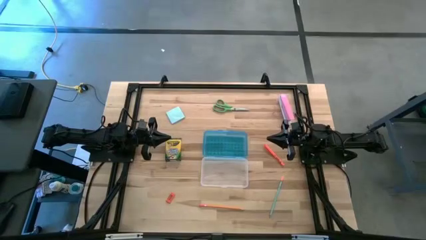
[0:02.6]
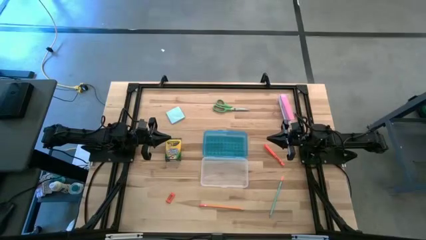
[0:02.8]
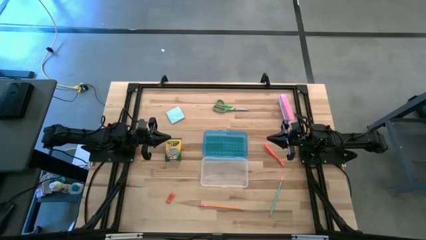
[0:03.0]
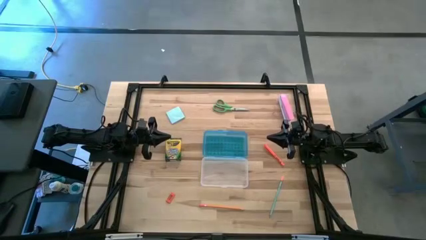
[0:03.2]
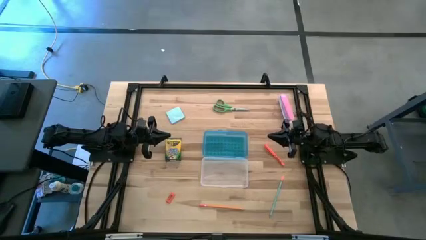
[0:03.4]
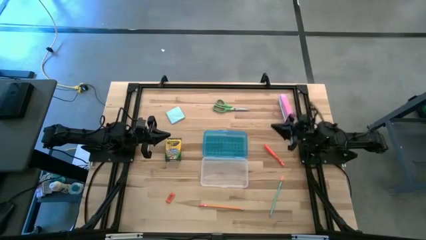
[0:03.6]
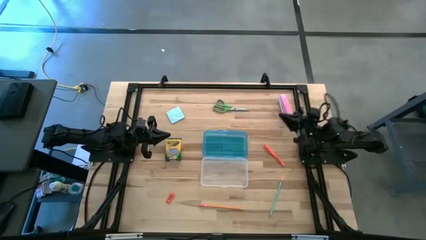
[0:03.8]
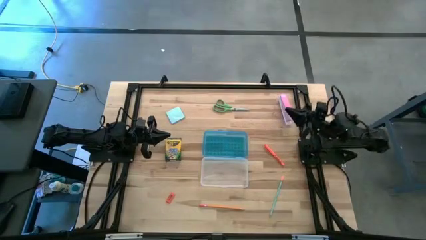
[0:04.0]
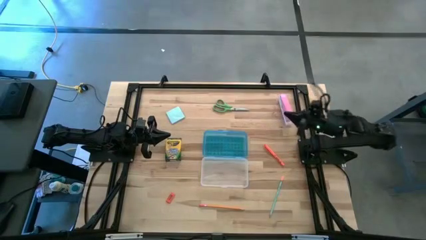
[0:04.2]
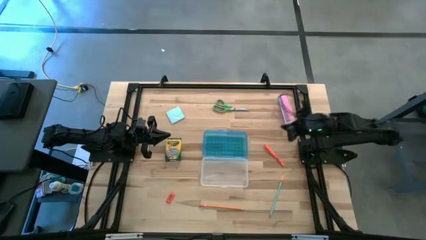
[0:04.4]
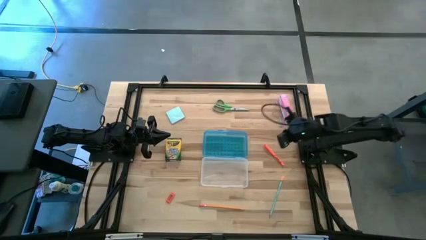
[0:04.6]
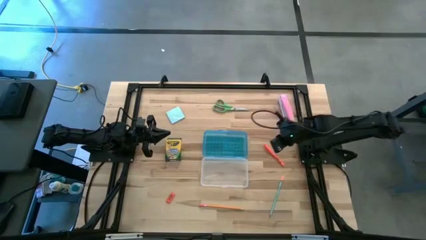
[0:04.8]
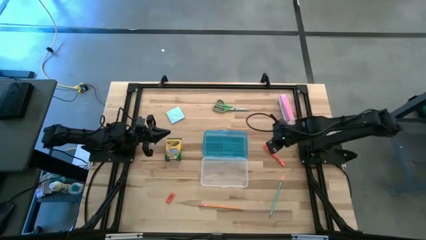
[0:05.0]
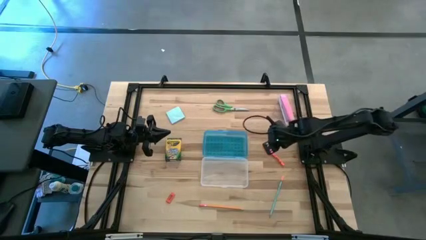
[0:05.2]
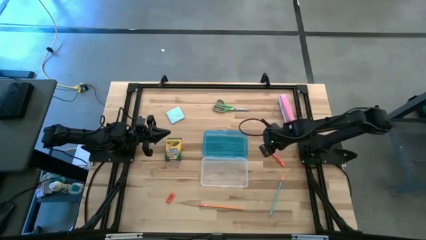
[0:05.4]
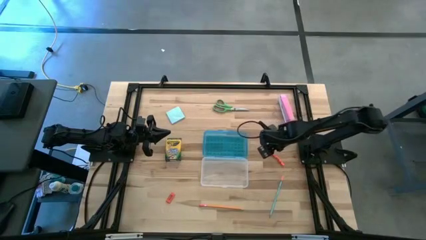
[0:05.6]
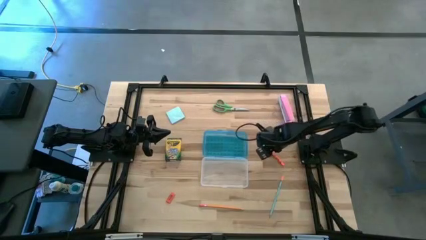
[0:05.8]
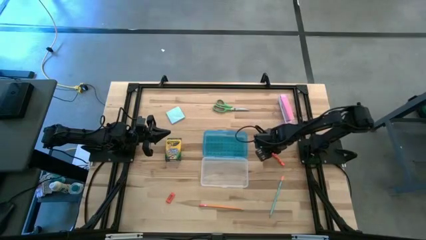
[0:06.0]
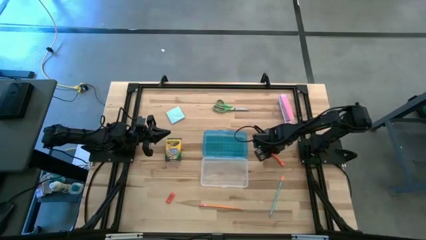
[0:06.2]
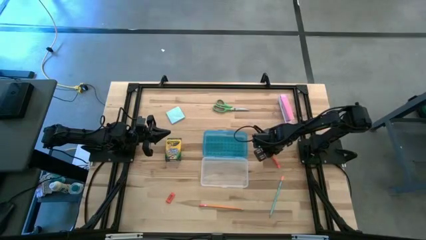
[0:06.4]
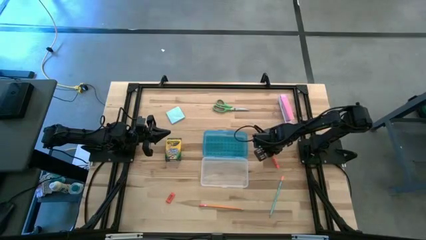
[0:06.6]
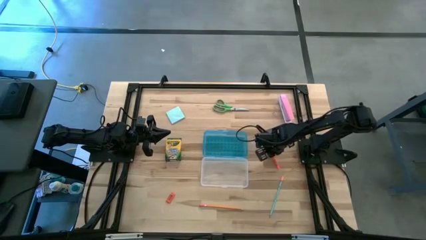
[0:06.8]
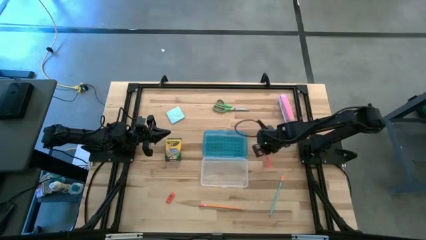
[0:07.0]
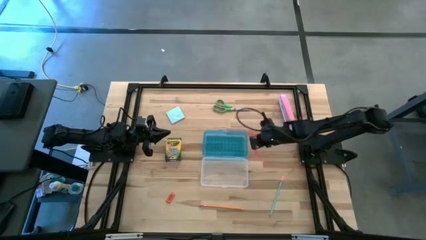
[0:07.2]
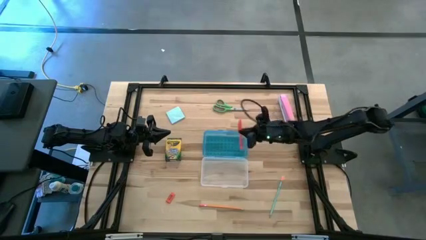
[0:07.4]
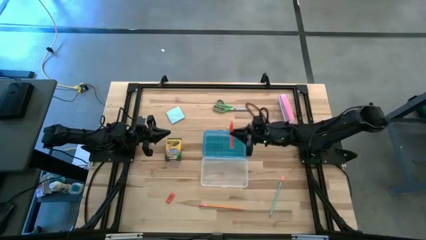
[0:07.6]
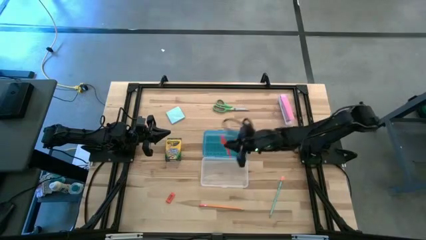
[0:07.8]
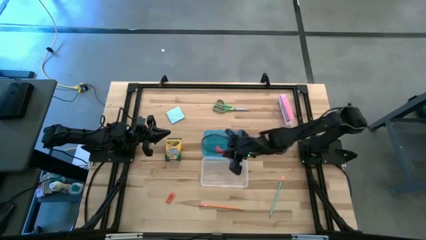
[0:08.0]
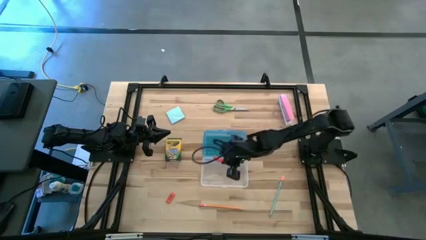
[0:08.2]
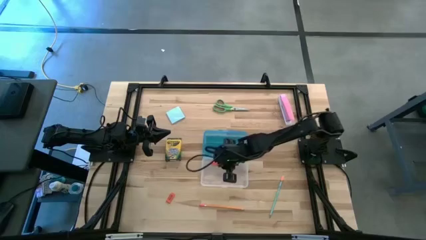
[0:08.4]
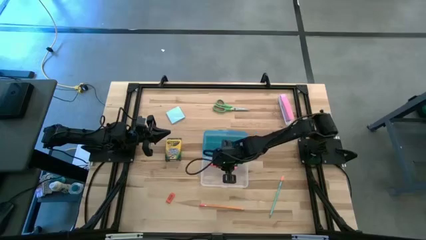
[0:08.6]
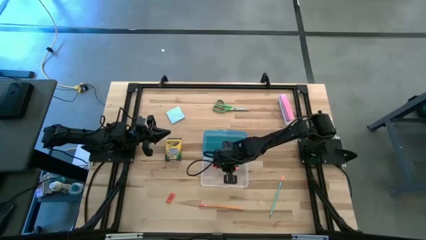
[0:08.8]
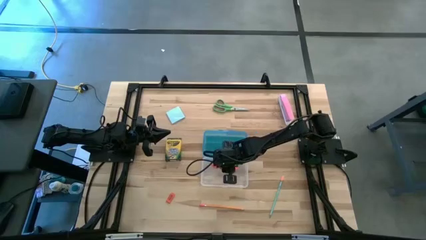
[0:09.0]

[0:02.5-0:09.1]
Task: Pack school essentials
Put the orange pen into the blue supply box

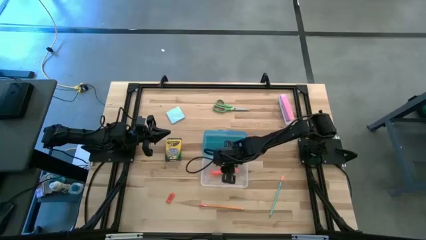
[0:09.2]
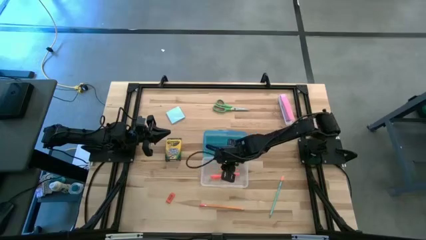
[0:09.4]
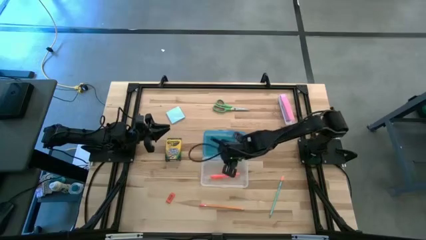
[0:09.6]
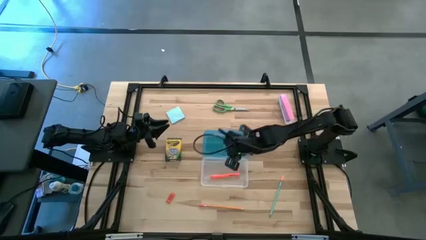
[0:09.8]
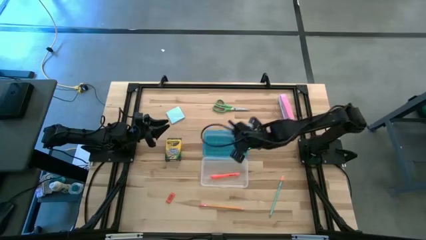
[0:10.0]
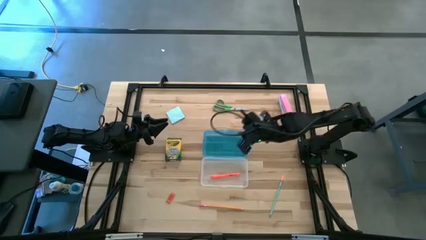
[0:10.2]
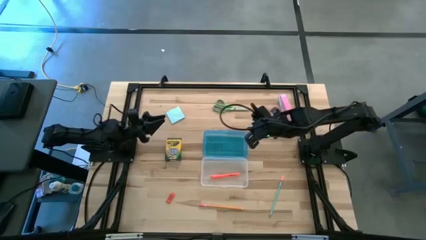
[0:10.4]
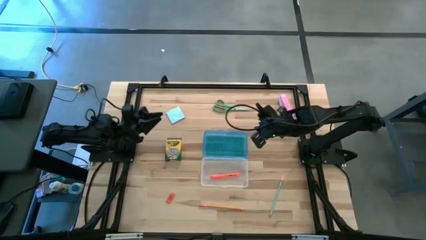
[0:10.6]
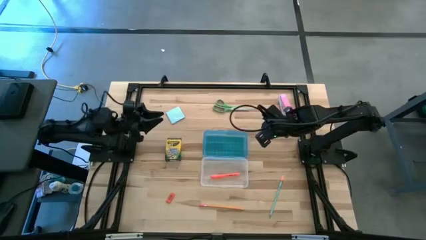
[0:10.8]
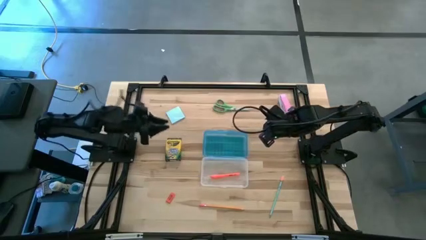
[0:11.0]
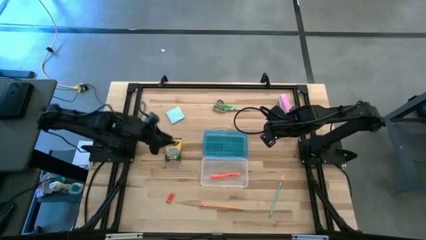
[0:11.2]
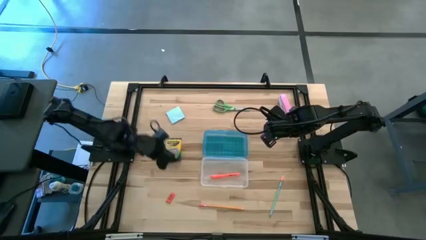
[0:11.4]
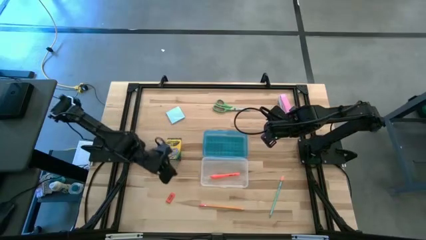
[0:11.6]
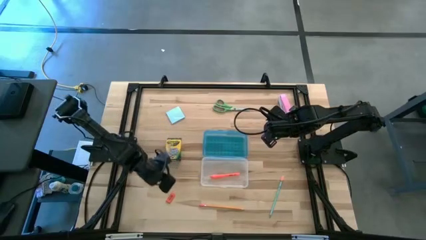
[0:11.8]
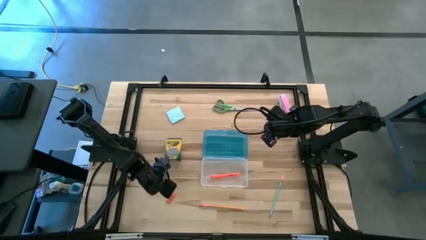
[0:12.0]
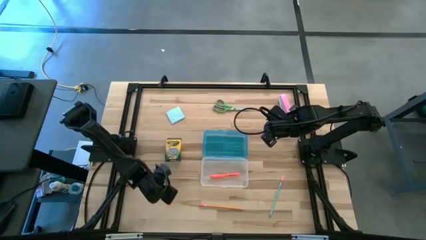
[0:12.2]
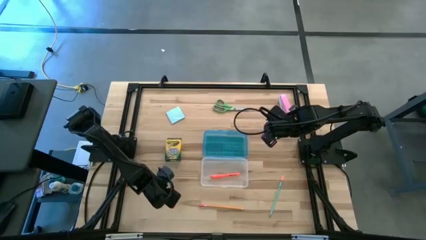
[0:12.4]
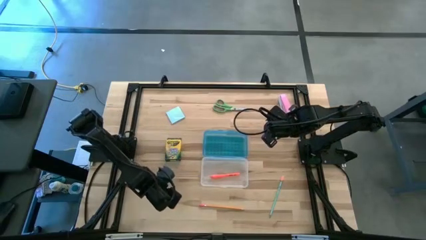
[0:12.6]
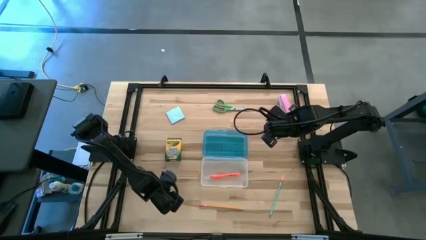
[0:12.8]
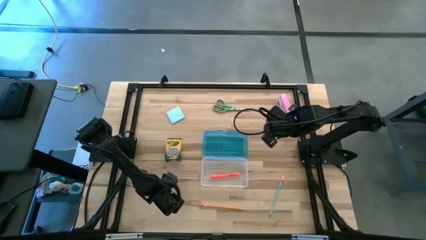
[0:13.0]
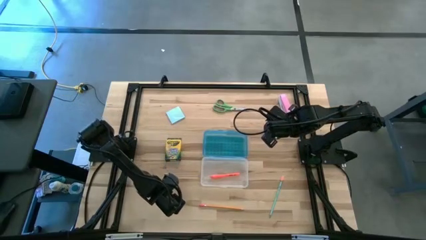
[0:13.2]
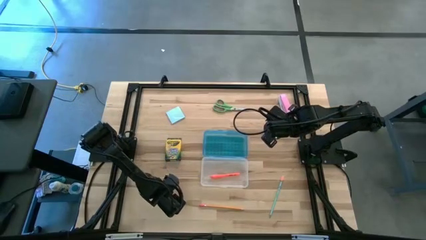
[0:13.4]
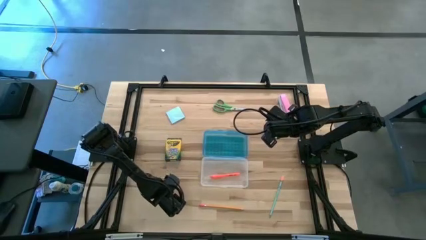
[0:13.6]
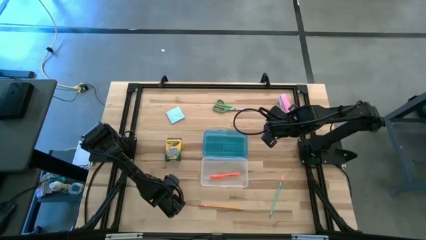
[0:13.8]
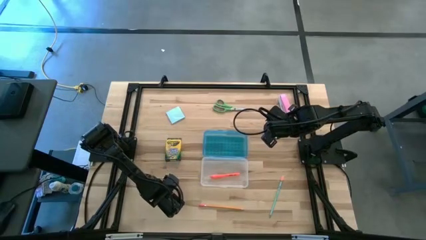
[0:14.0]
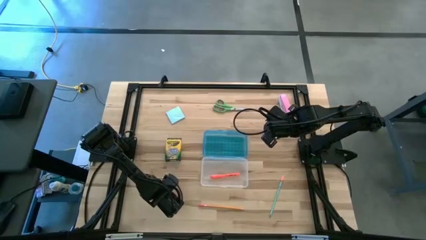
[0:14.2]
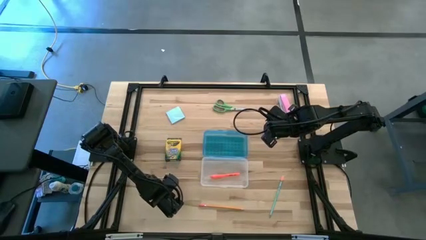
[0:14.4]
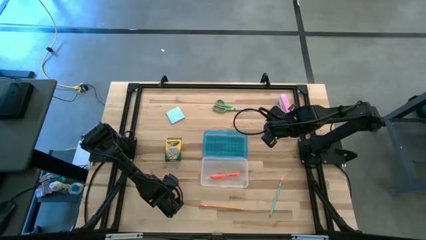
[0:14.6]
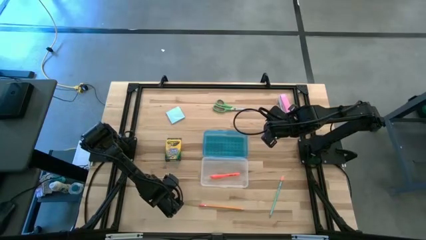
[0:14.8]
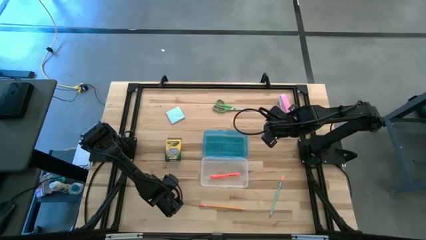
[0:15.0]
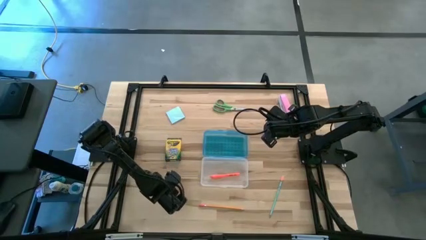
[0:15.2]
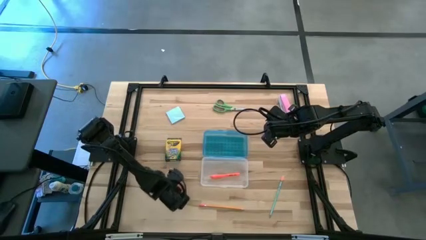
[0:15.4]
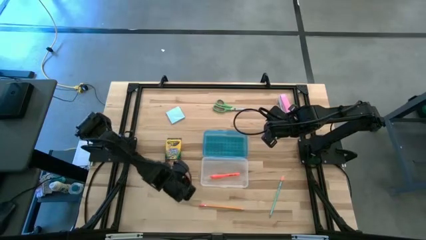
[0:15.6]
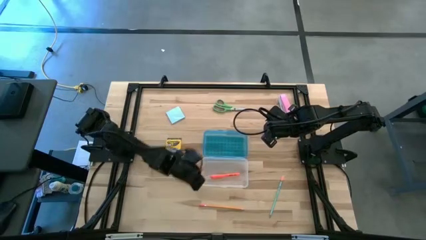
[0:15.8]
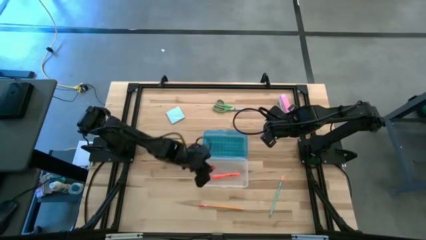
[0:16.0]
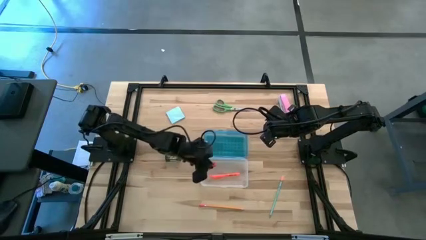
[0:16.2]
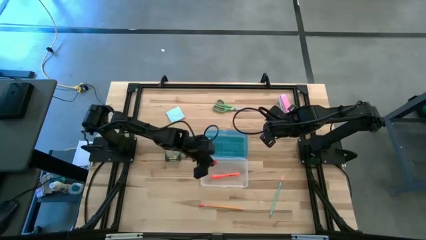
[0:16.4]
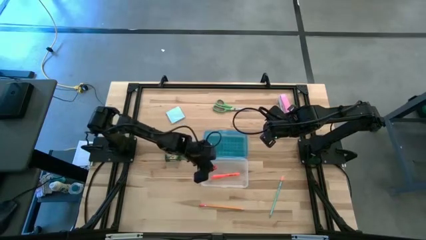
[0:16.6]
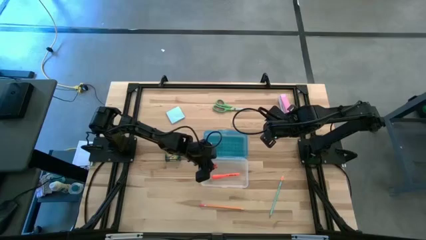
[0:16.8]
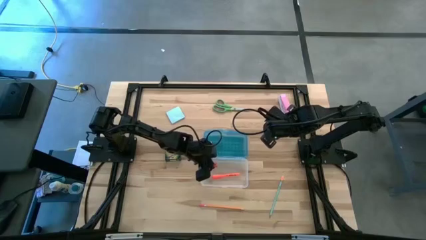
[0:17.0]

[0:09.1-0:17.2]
Put the orange eraser into the blue supply box

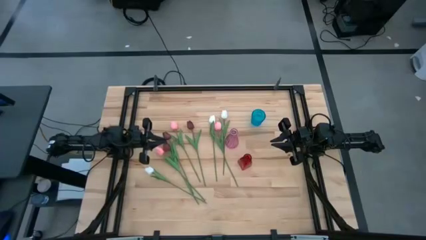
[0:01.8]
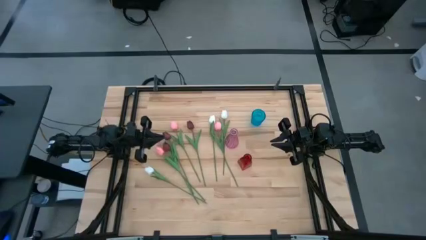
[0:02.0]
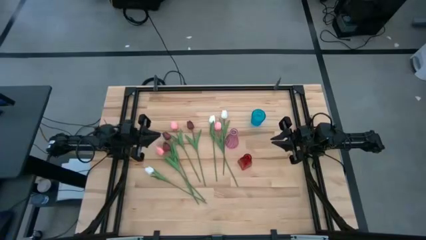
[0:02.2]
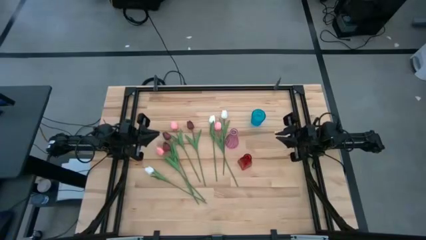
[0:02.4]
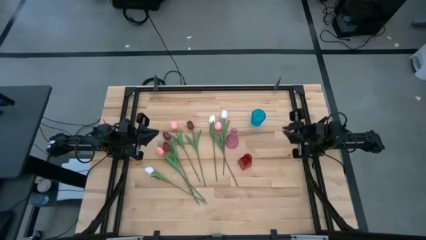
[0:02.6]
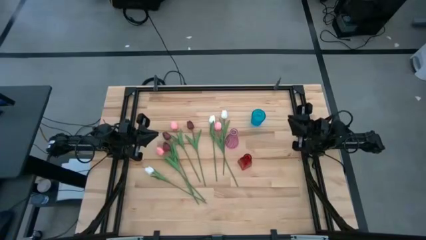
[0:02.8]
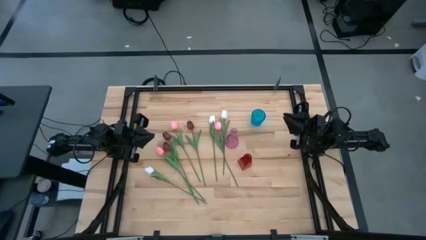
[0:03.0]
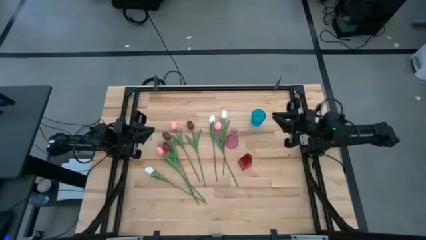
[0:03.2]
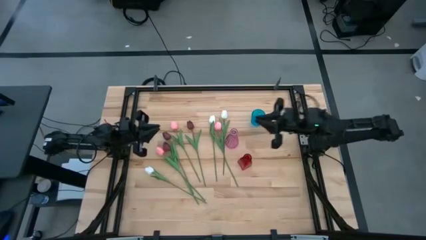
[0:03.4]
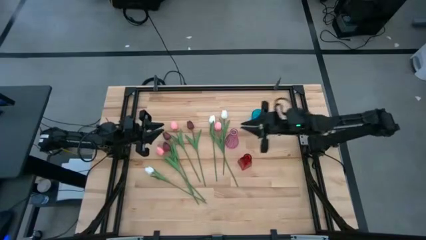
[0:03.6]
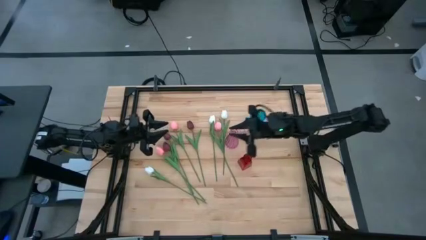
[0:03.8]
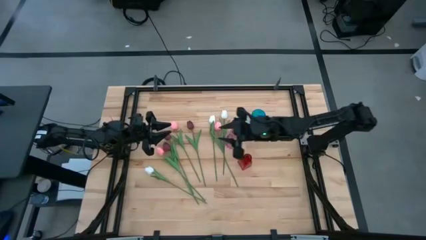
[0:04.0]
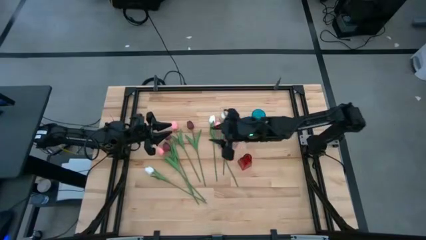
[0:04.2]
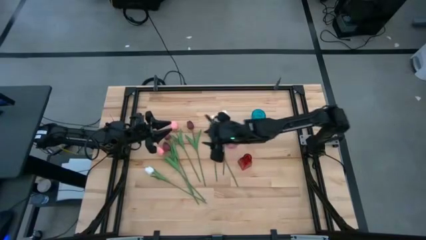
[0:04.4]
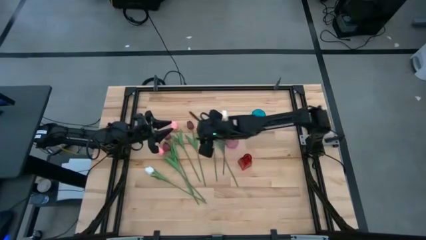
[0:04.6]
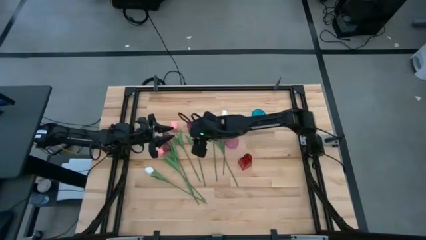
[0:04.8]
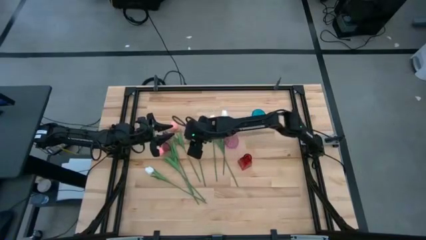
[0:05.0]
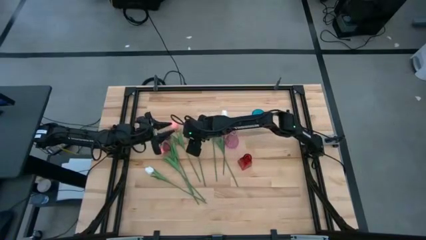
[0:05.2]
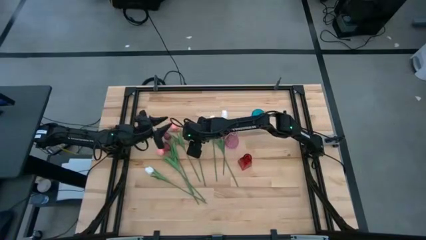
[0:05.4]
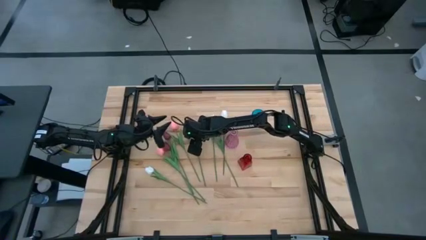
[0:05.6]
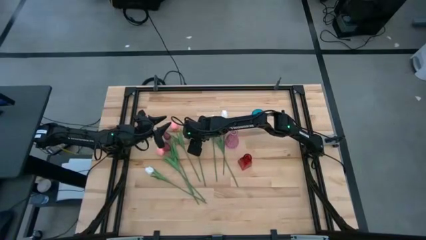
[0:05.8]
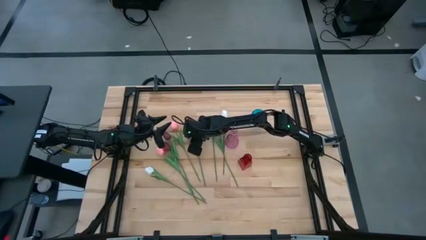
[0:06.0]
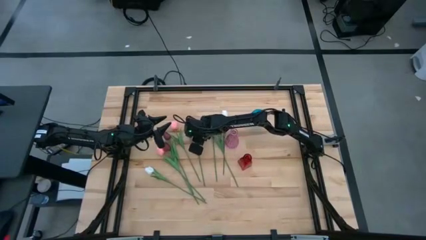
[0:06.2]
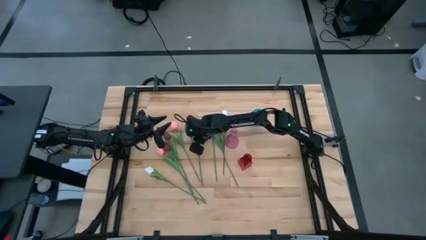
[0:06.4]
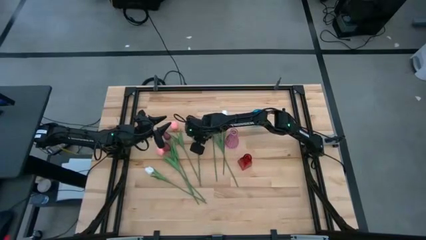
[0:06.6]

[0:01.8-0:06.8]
Task: Sort flowers into vase by color
Put the right red flower into the pink vase
